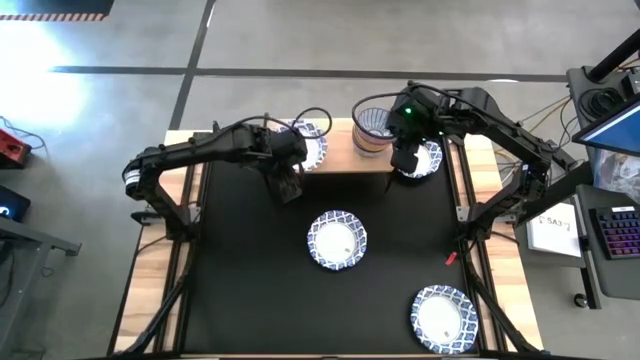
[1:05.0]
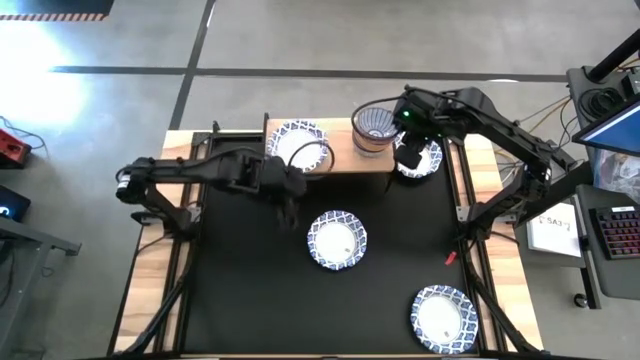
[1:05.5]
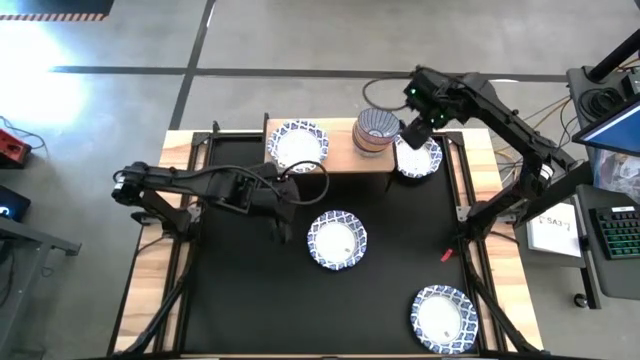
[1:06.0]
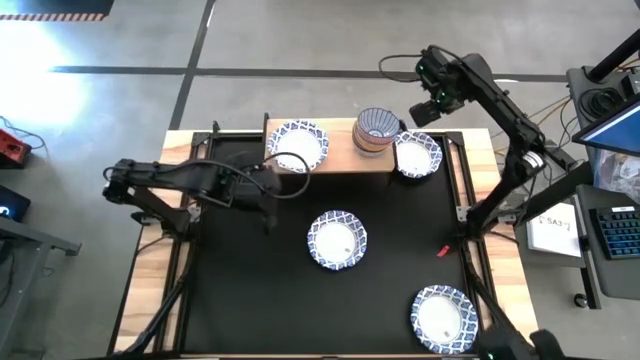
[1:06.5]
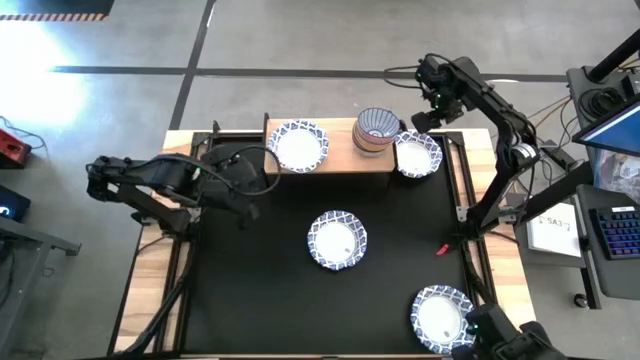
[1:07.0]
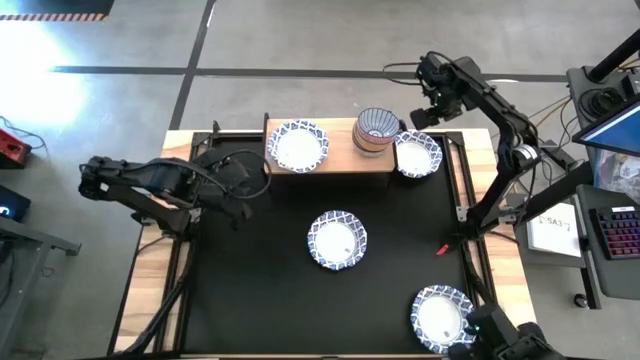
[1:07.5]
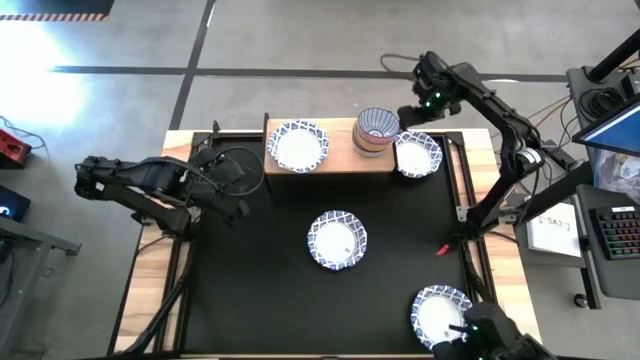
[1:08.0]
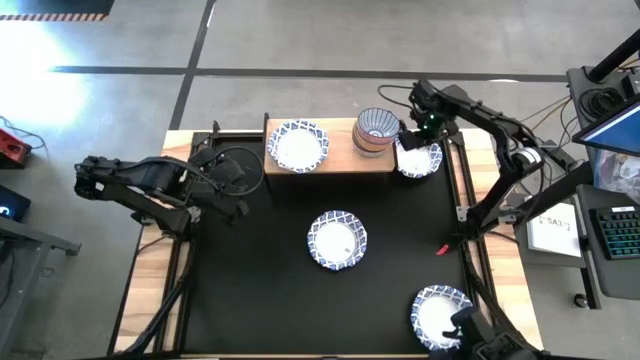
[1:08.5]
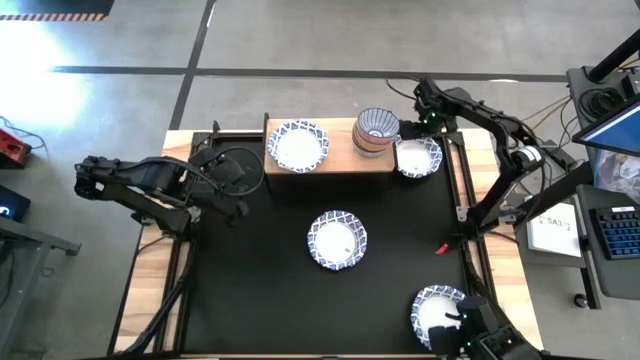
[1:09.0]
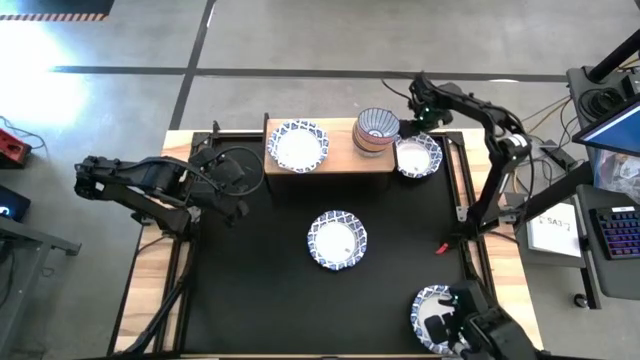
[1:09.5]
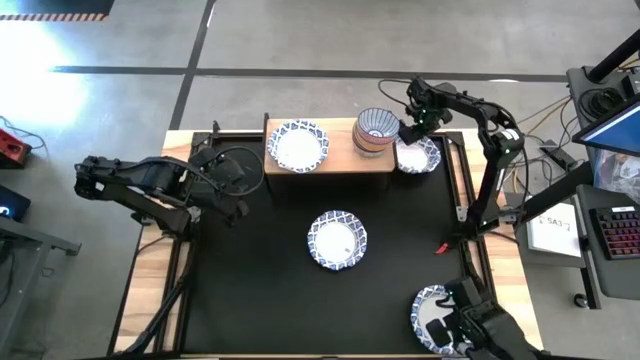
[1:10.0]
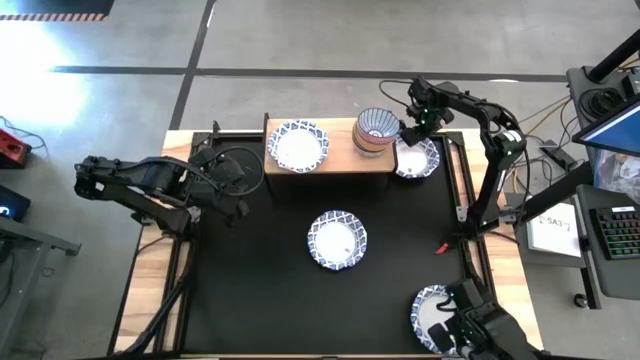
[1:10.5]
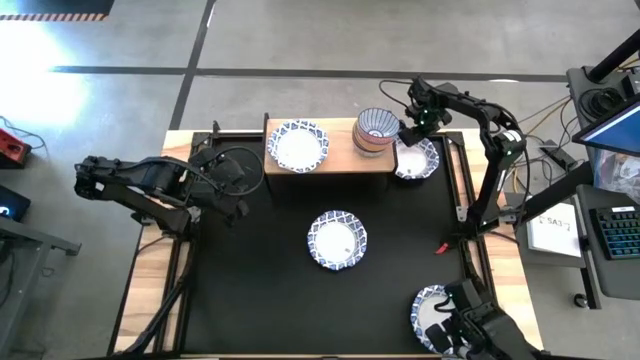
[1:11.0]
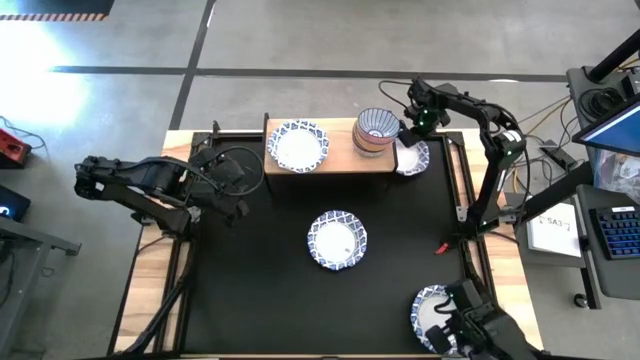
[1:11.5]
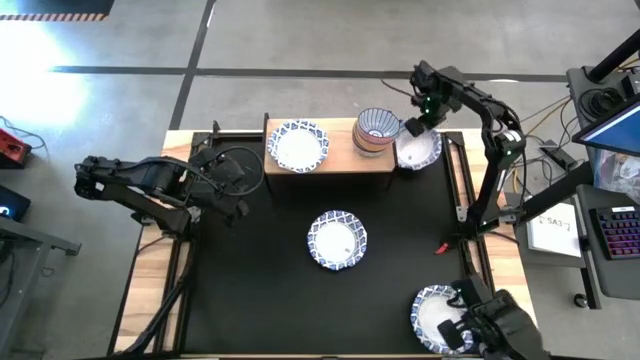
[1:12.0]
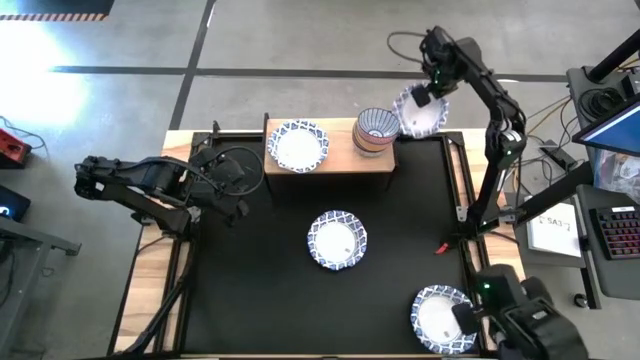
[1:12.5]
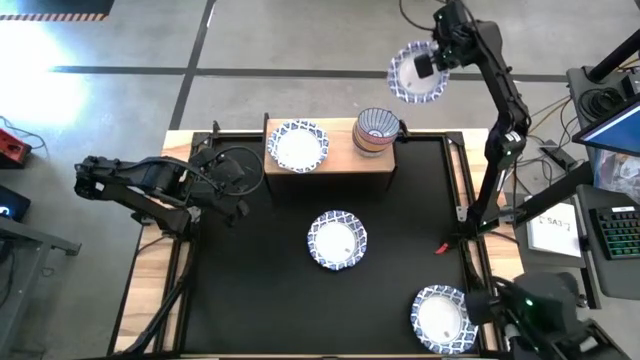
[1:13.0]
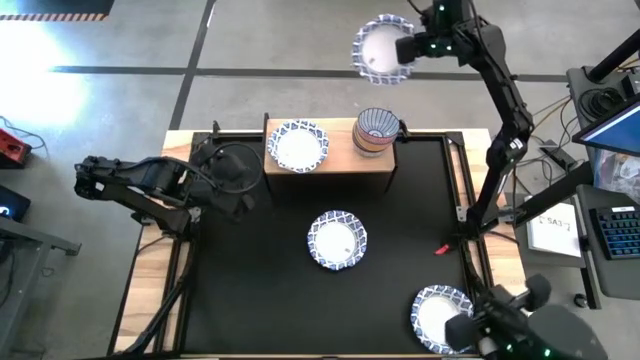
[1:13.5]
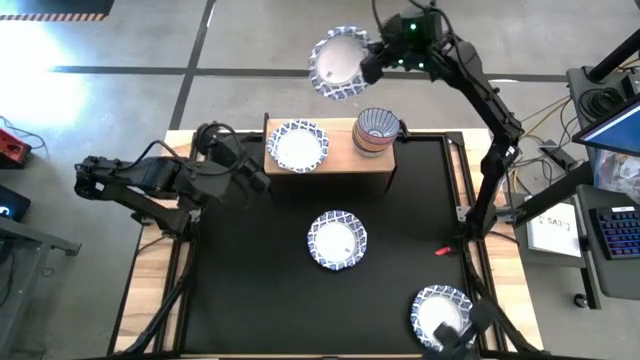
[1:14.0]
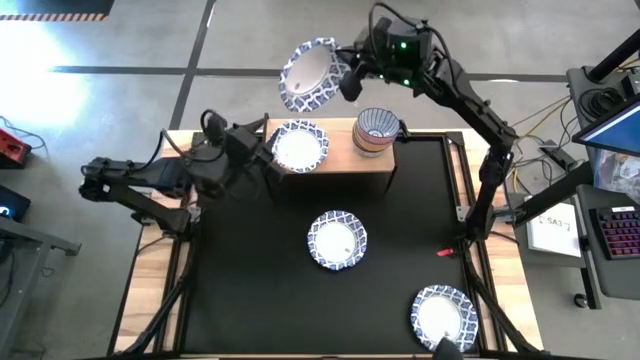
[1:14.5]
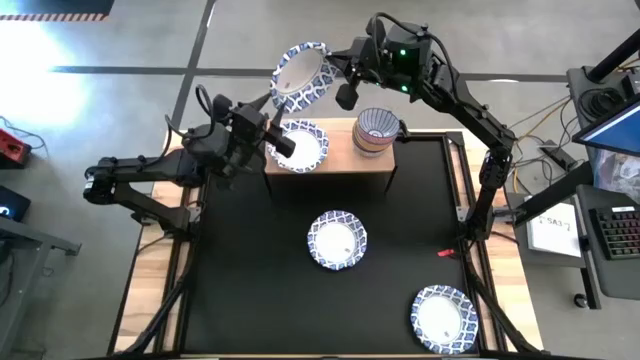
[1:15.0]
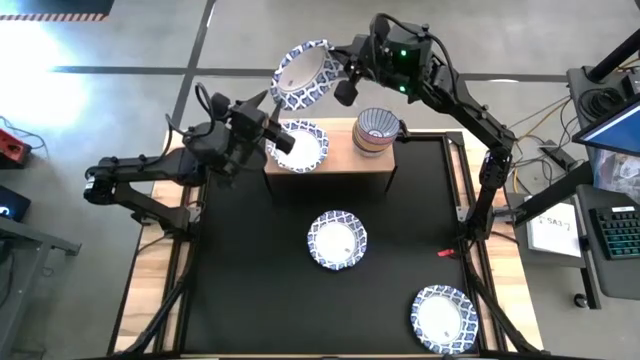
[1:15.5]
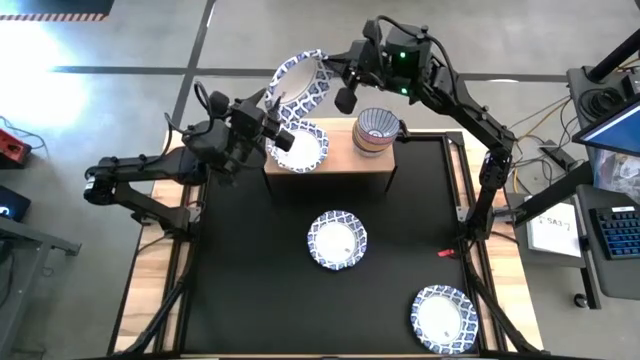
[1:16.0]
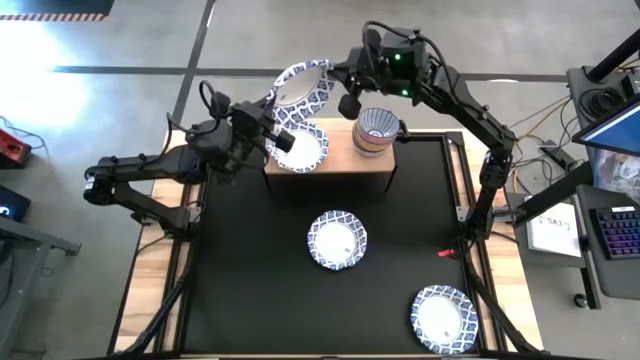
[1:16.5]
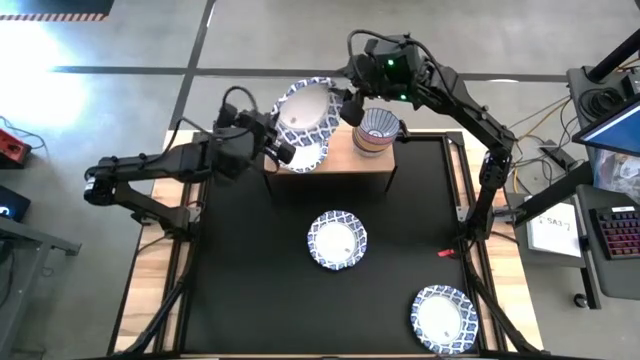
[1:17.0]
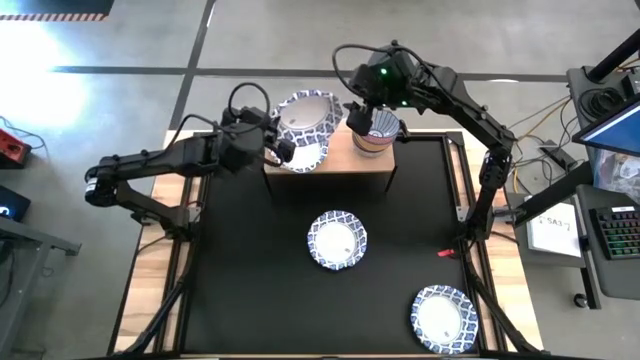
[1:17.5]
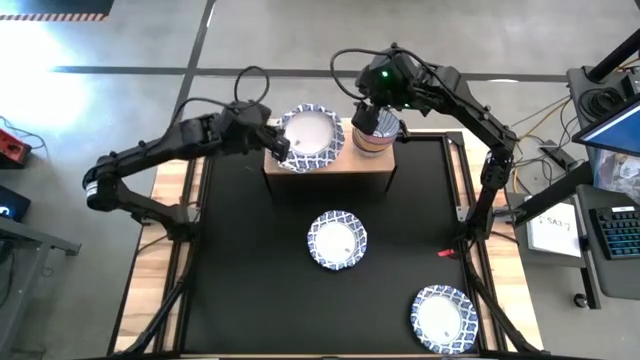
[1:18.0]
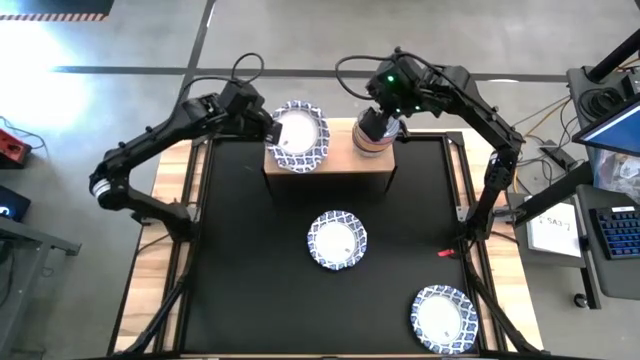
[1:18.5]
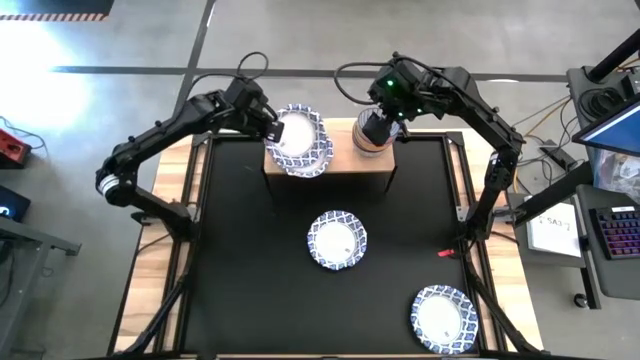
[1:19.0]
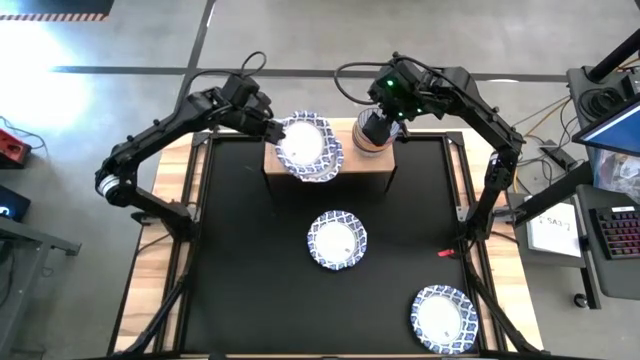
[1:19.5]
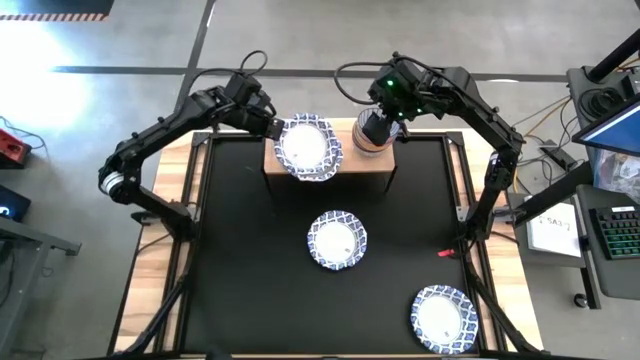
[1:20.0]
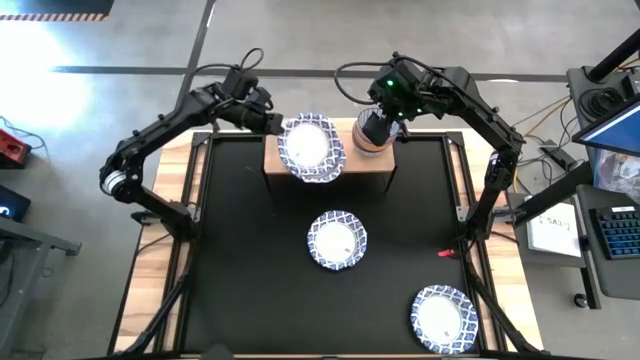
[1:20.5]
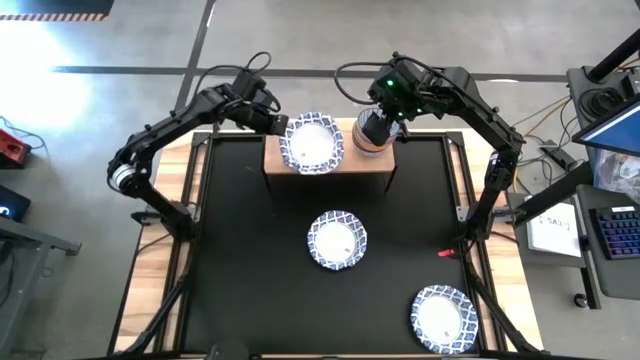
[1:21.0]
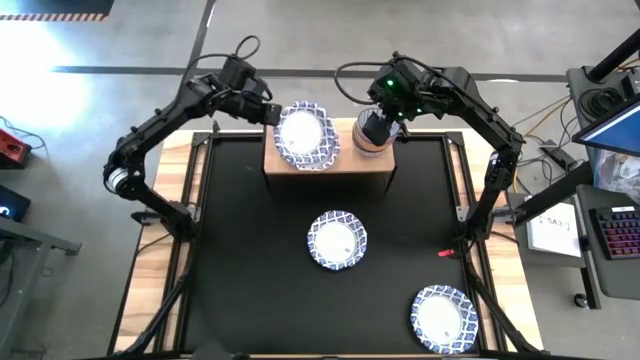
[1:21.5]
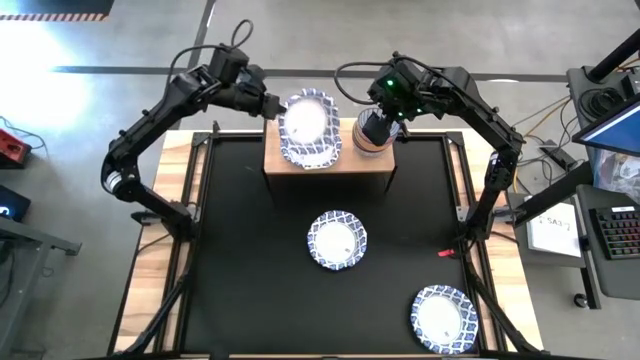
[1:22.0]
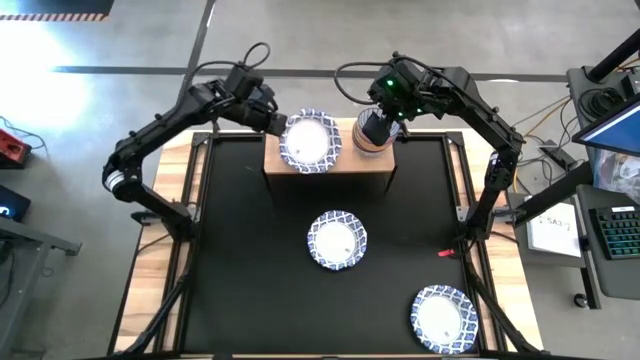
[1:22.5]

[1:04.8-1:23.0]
Task: Place and stack bowls onto a shelf
Stack the white and blue bowl on top of the white and blue bowl on the shelf

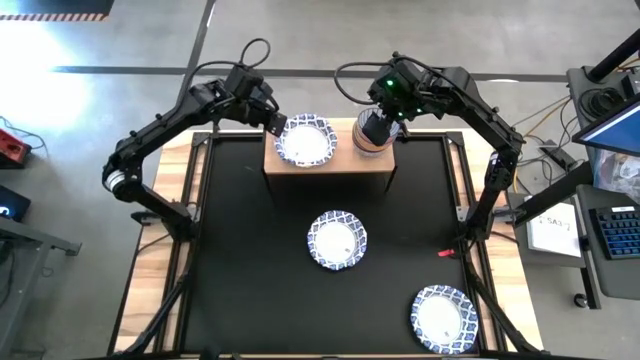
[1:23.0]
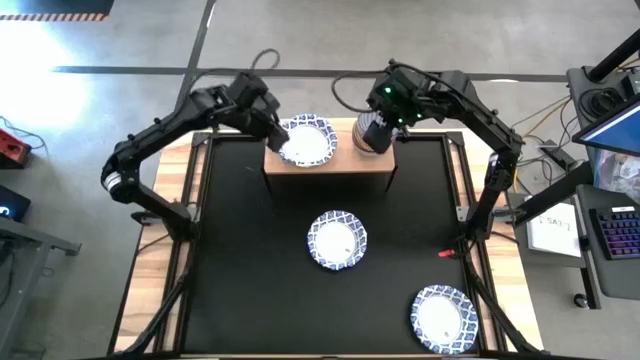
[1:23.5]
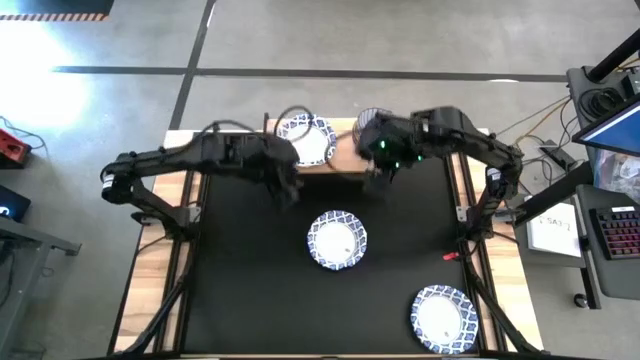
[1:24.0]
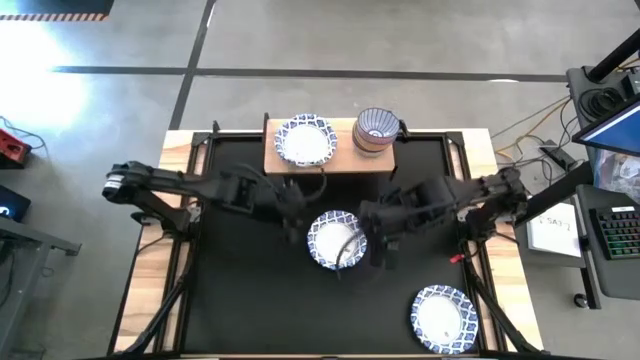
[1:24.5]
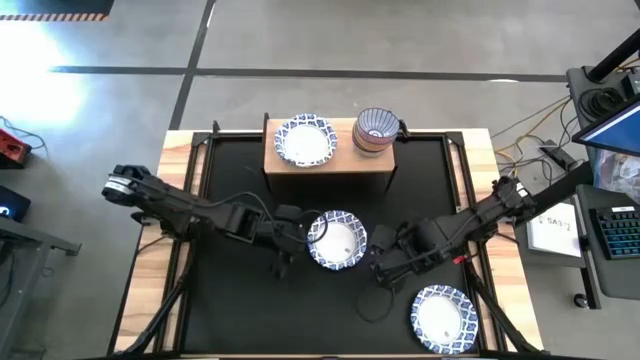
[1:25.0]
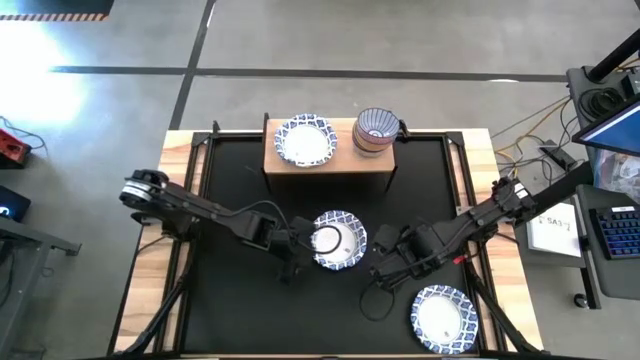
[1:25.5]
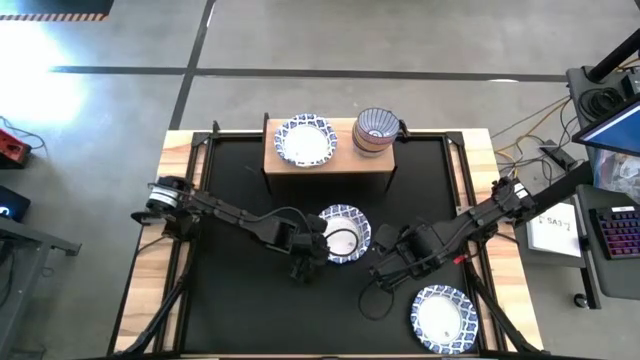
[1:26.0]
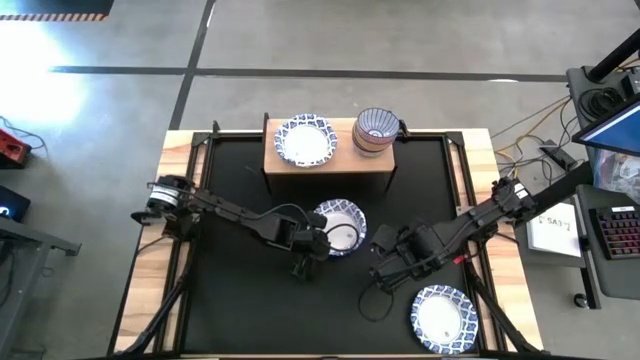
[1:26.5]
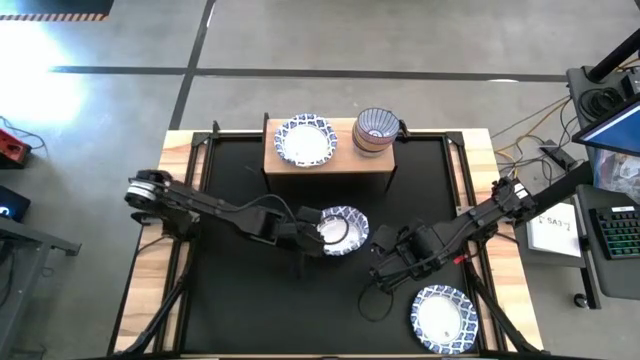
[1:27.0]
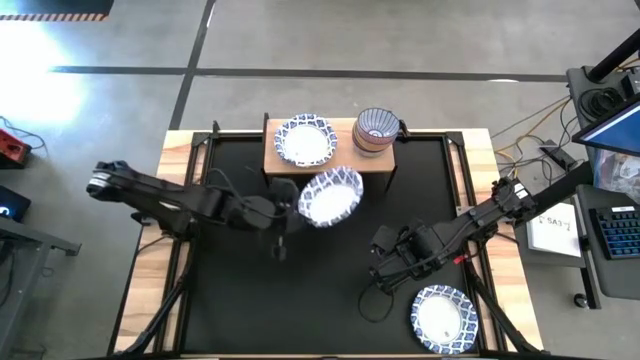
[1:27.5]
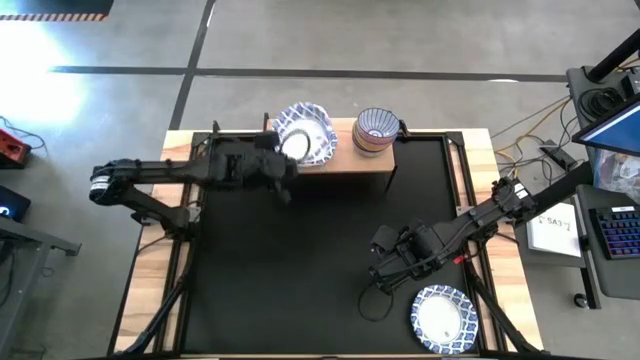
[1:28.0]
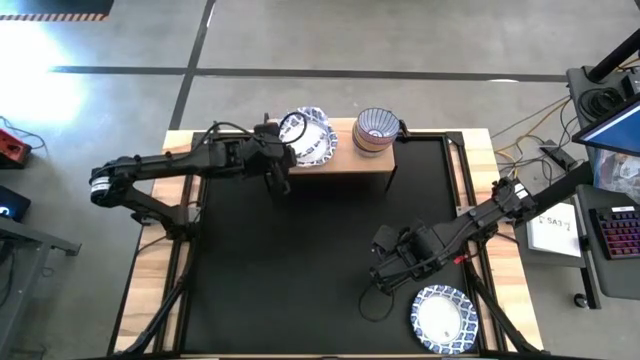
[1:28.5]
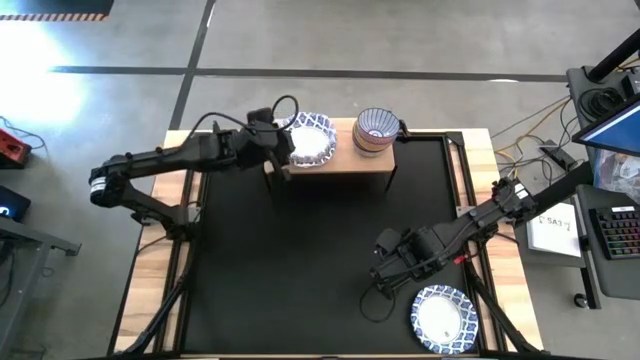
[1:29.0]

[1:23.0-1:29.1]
Stack the white and blue bowl on top of the white and blue bowl on the shelf
